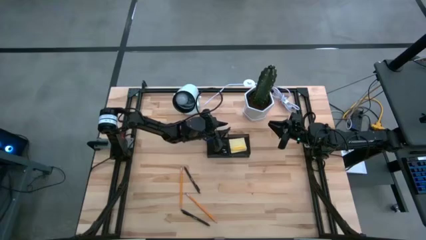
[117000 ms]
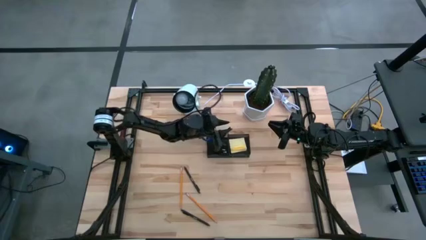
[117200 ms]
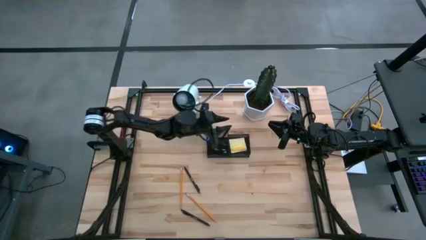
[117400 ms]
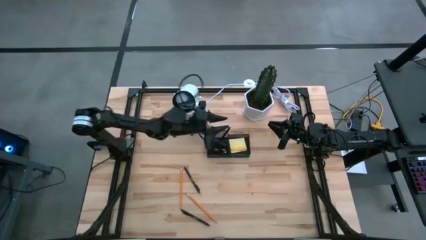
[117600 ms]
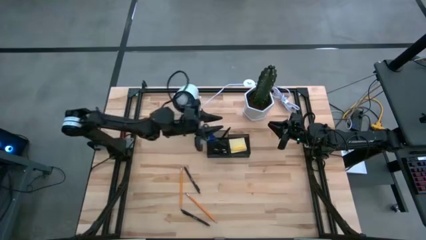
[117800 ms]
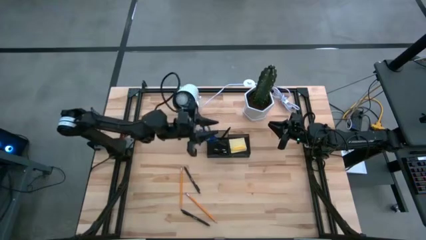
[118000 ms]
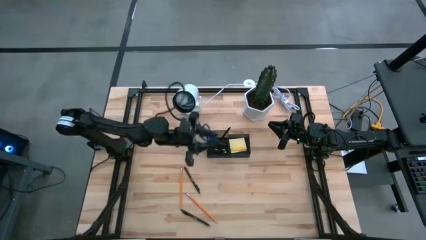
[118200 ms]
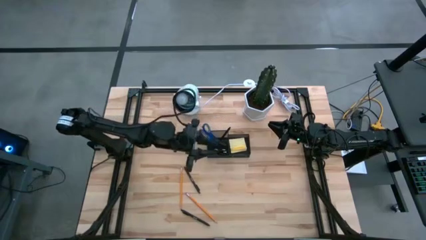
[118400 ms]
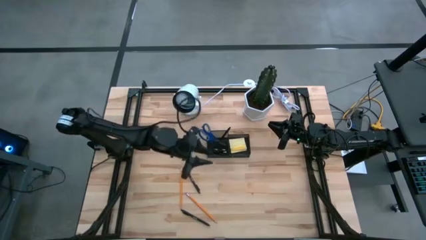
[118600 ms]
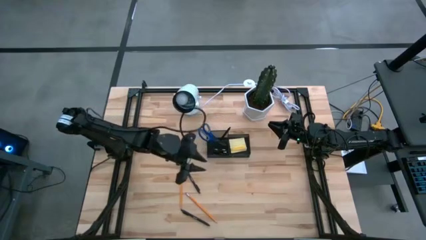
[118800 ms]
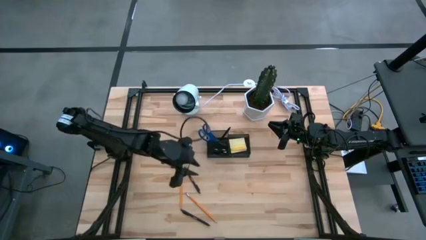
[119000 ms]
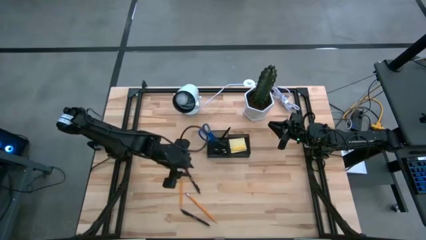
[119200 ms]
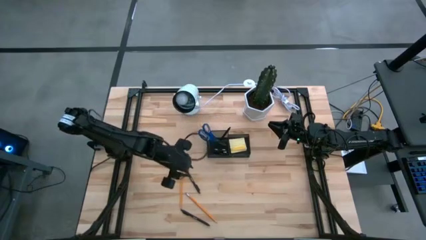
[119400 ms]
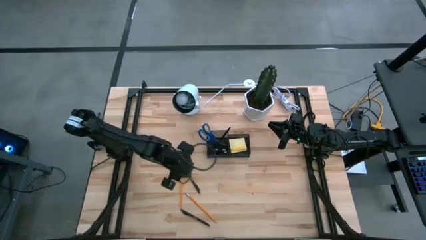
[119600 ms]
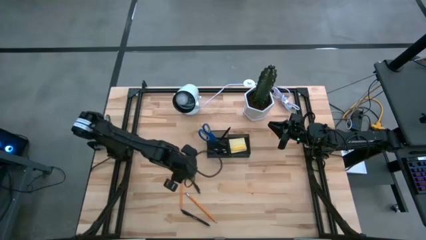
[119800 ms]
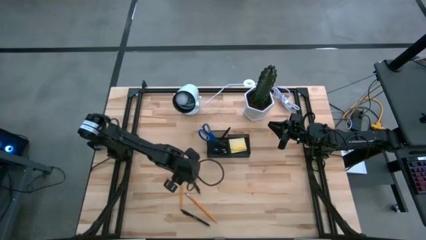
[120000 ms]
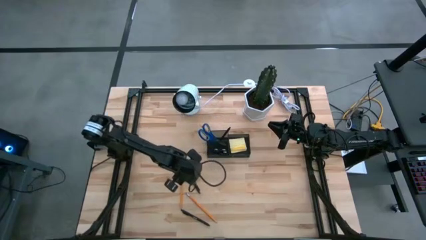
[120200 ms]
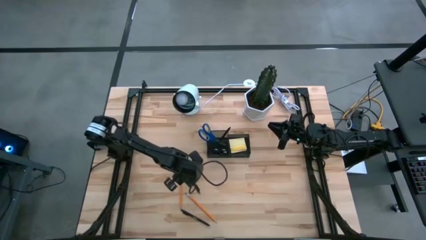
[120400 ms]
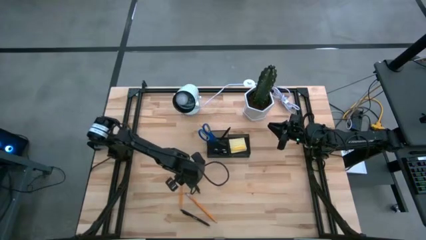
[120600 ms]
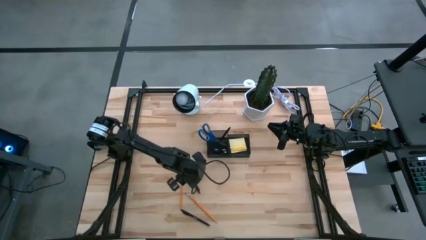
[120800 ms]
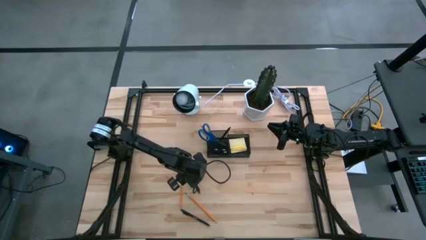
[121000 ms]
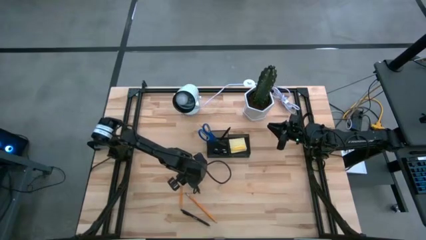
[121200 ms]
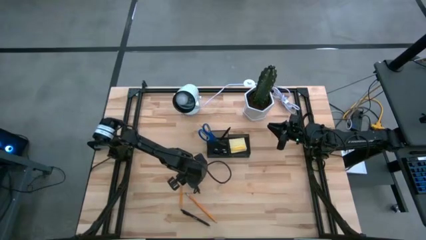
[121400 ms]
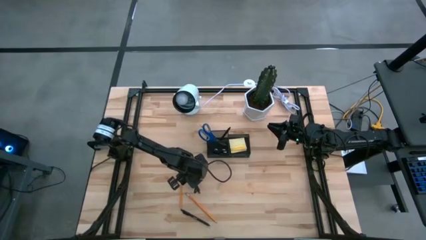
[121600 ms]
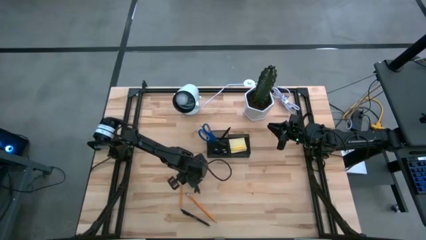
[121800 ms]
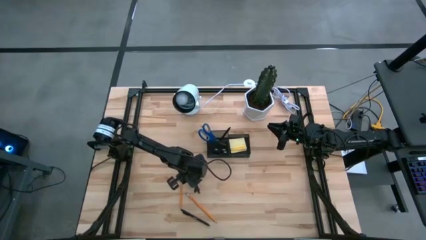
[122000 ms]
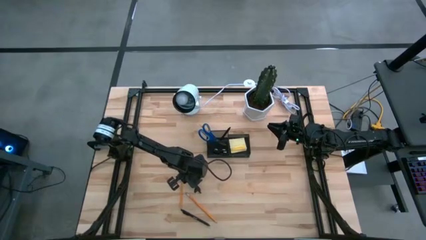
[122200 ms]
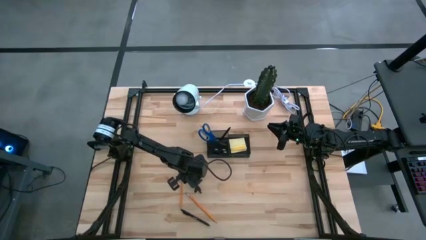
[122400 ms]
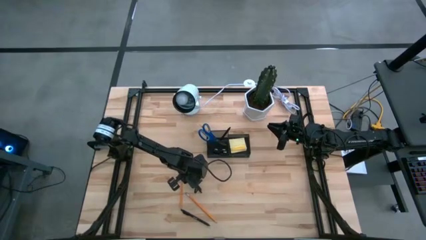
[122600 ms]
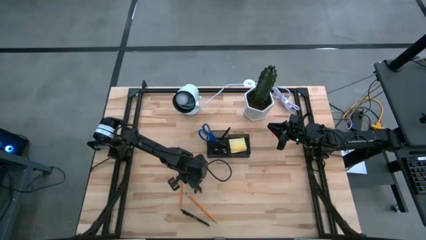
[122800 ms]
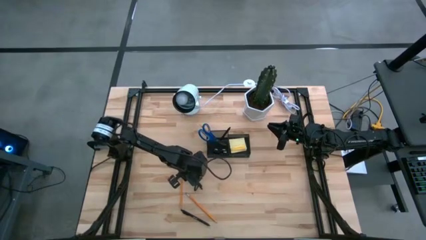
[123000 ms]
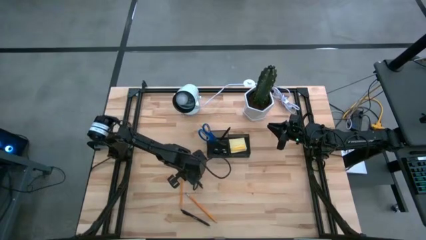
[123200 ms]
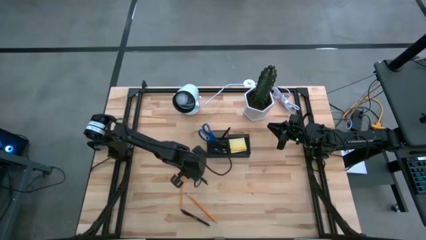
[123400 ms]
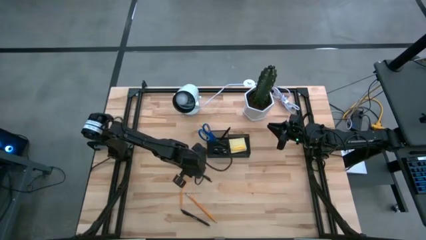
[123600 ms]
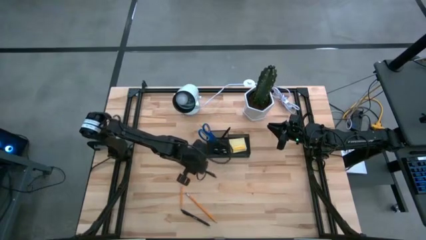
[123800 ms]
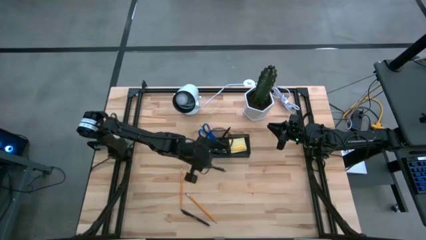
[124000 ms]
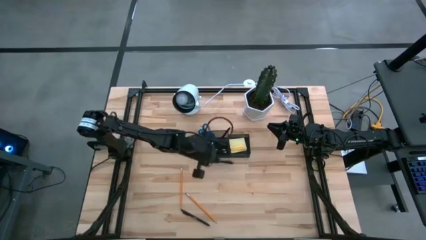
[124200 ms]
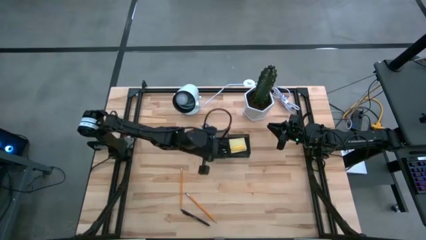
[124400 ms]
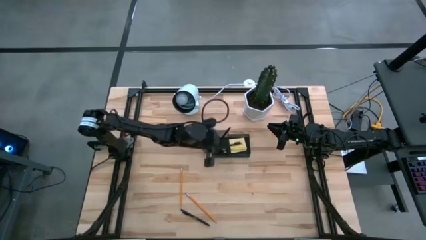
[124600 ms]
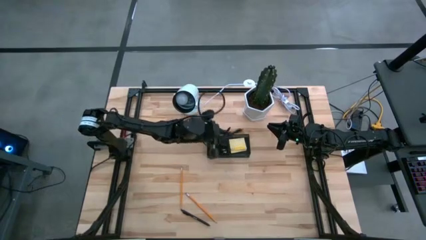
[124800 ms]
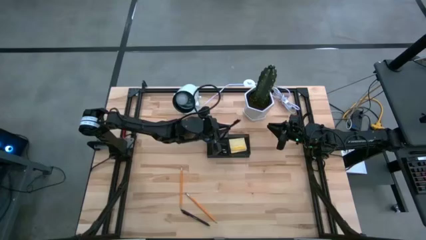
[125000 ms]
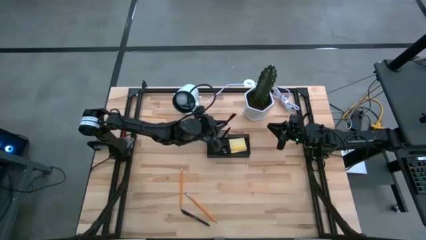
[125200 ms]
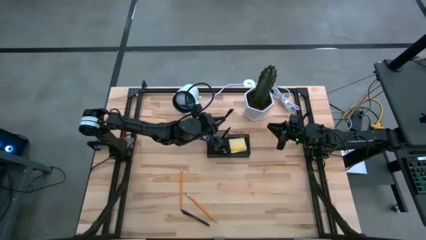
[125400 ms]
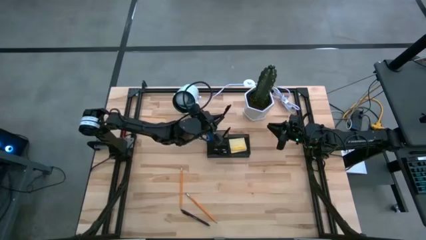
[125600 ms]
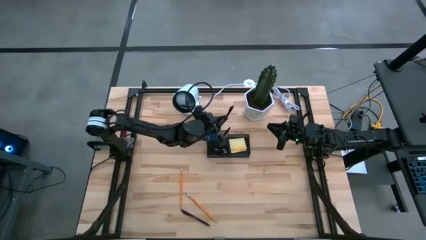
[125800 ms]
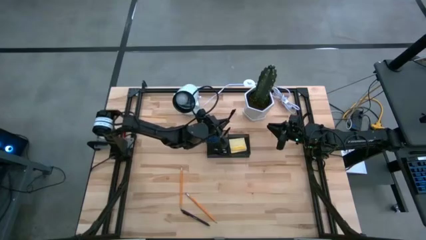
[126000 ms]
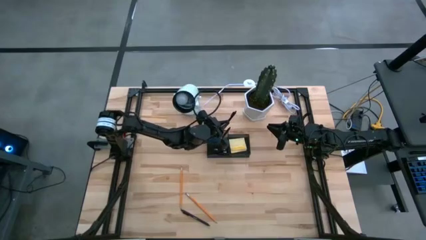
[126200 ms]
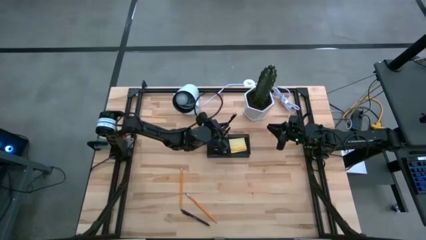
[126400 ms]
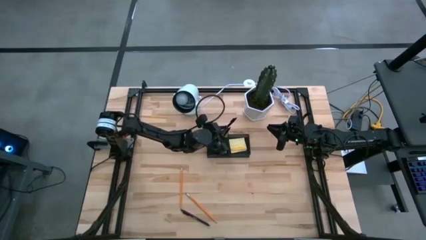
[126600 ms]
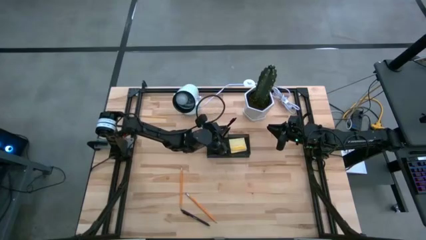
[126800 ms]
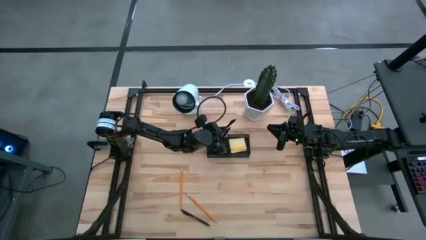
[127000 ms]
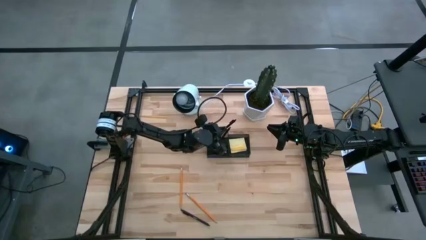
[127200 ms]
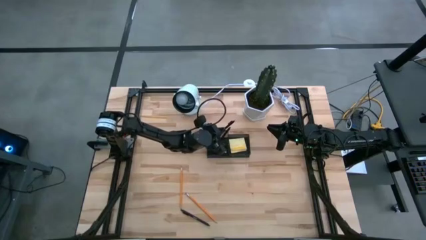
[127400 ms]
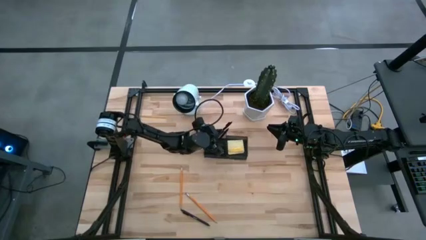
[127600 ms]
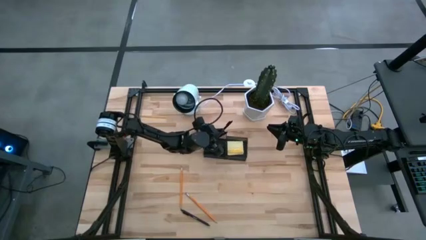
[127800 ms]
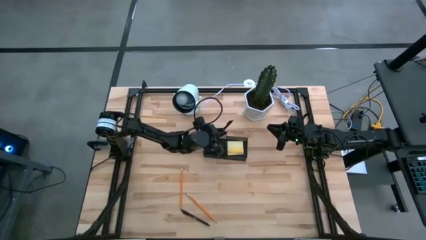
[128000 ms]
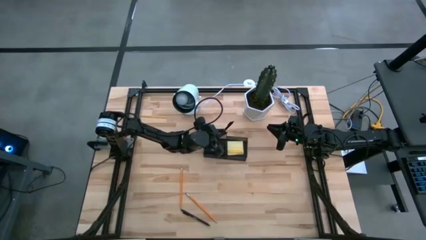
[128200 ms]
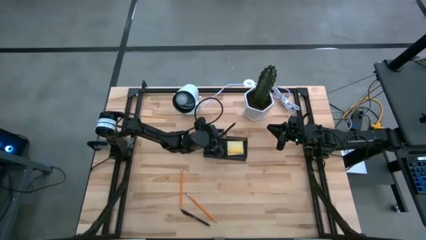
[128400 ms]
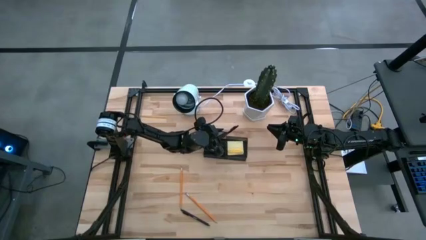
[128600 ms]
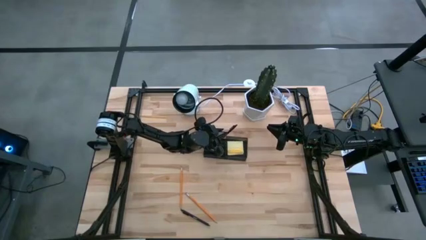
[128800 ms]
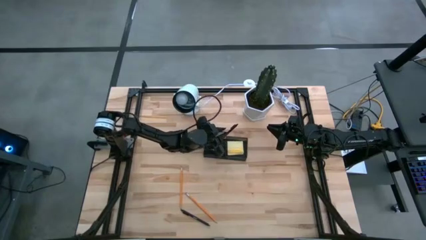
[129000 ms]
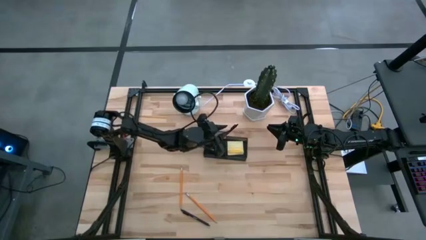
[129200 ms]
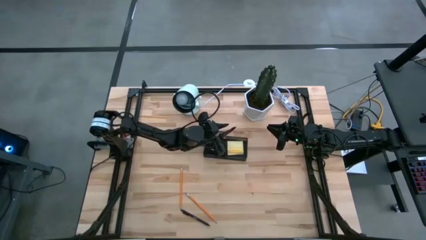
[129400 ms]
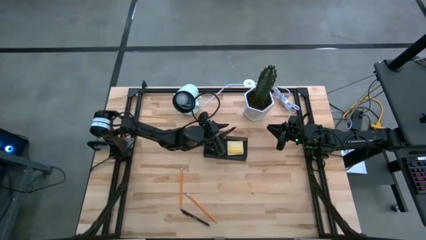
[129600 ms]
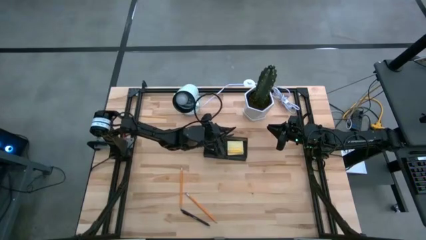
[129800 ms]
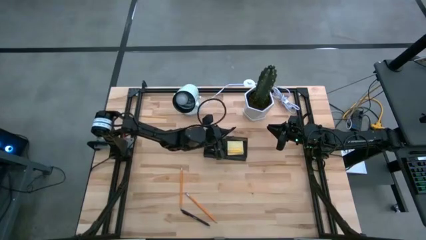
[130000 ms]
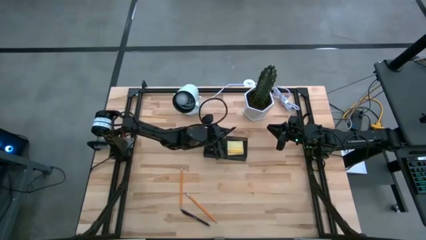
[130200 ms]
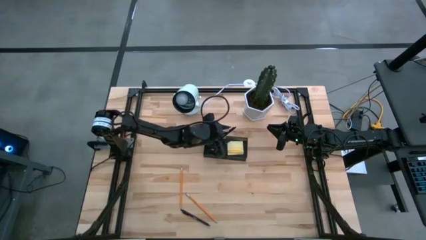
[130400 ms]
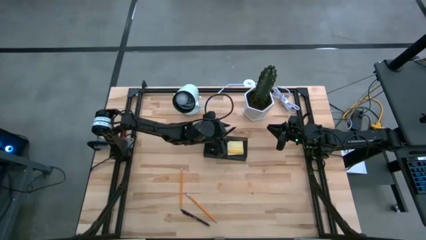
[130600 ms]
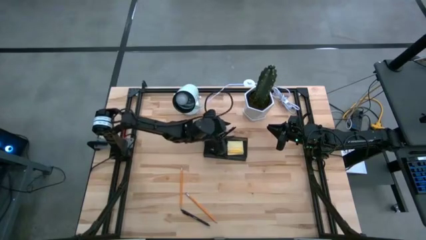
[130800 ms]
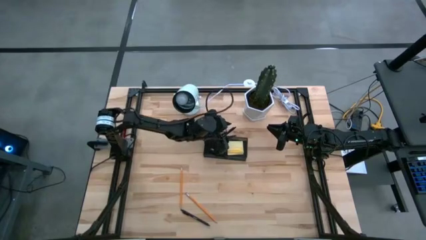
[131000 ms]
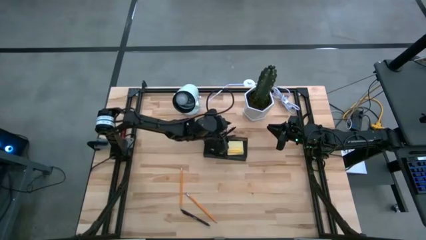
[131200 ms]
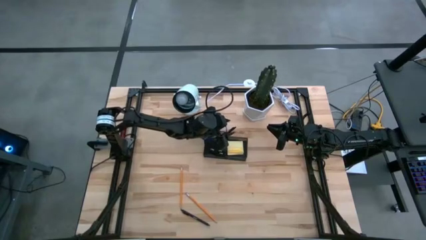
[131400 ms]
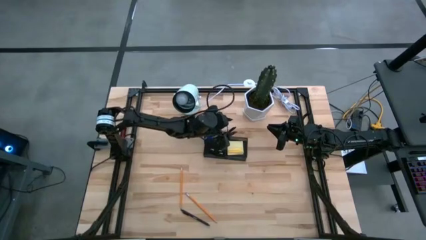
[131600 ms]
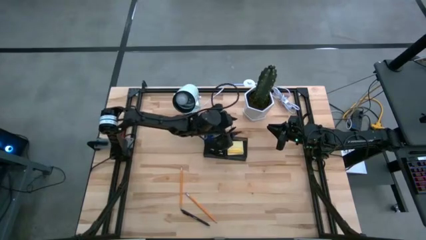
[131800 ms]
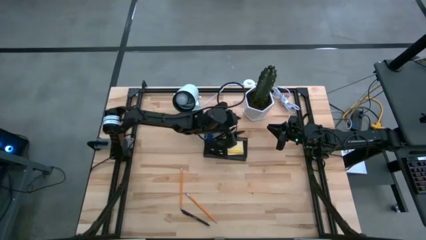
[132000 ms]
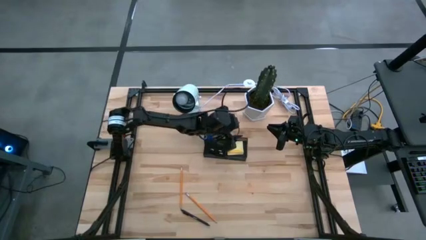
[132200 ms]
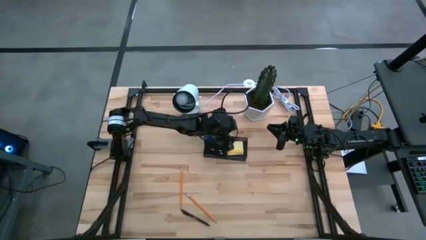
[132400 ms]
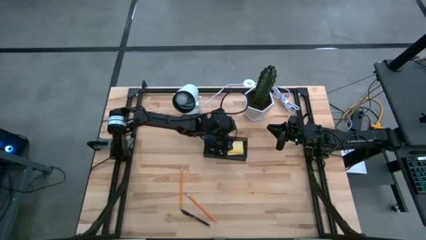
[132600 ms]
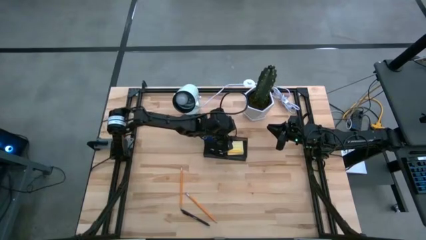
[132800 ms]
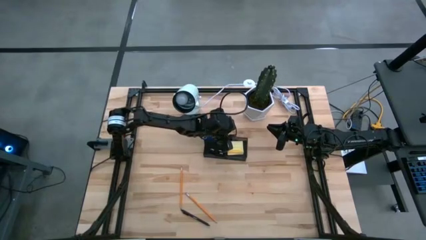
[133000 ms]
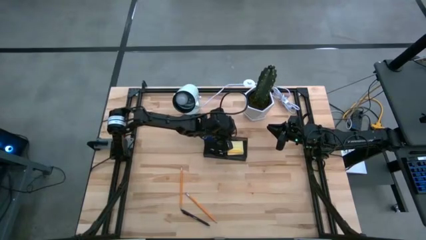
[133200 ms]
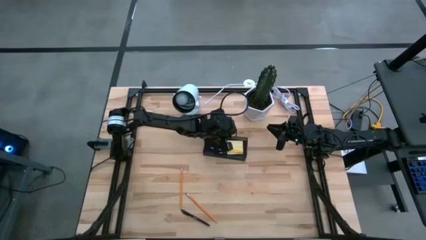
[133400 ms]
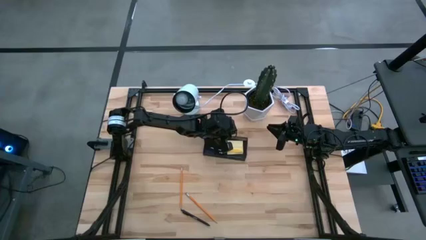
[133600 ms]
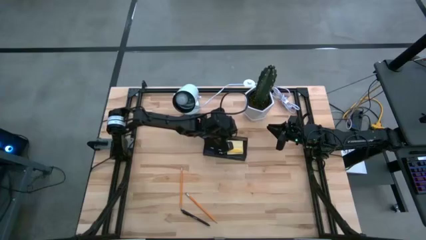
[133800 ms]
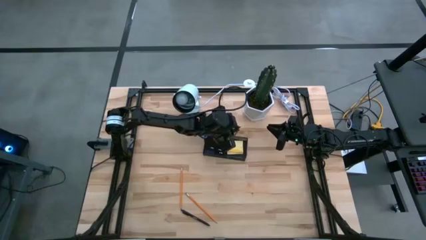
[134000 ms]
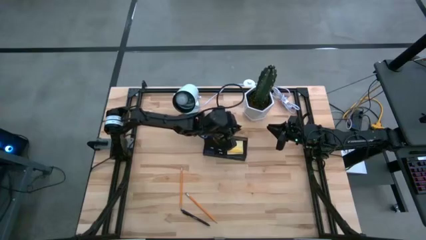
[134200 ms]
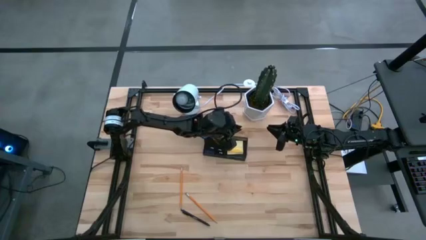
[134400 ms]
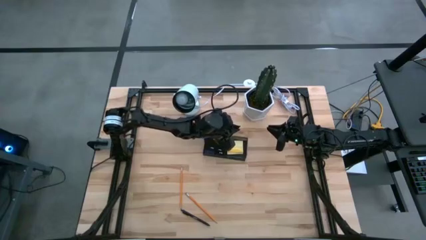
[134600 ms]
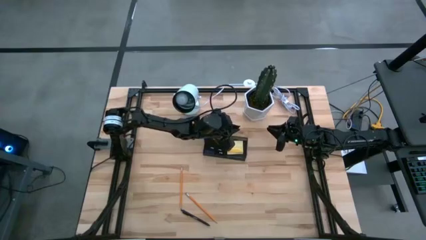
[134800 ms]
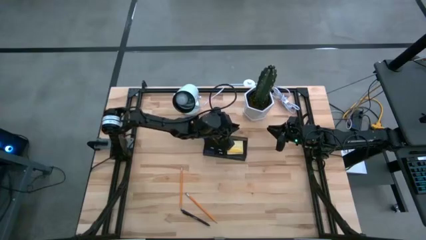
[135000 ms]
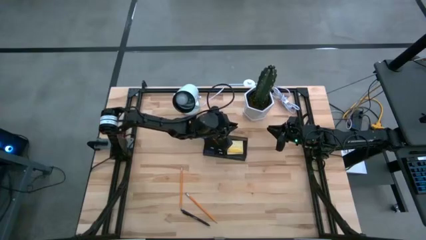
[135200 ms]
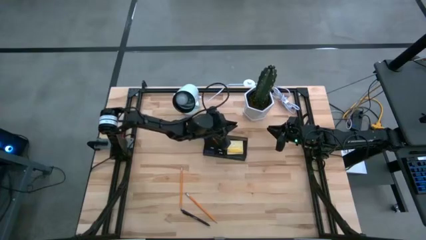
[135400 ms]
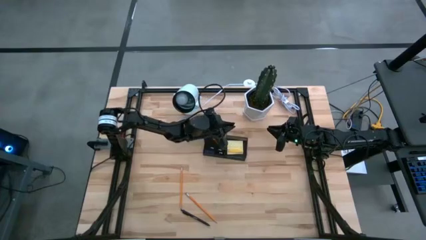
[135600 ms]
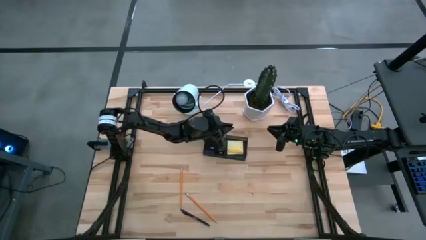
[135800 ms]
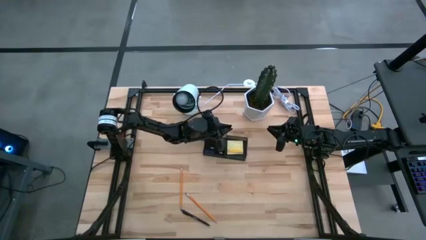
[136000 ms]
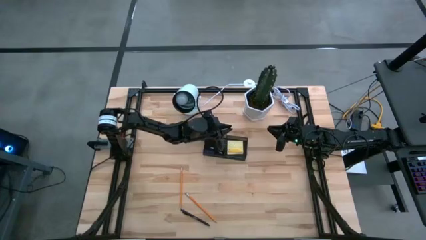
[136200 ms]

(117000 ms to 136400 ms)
Task: Pick and place office supplies into organizer
Put the top black pen into the black desk organizer
